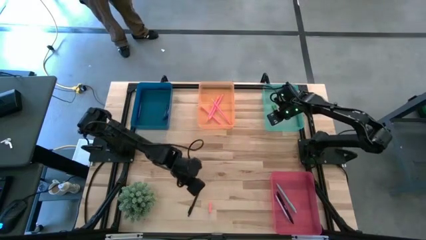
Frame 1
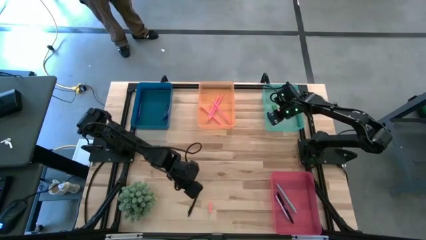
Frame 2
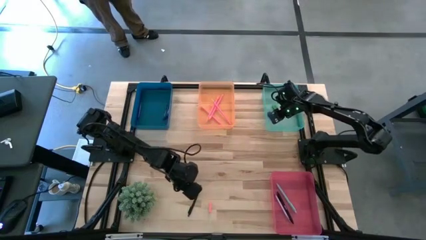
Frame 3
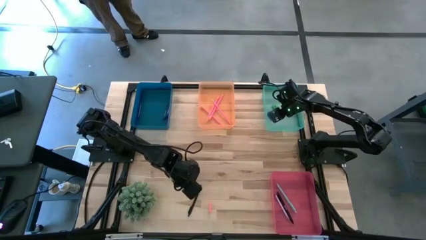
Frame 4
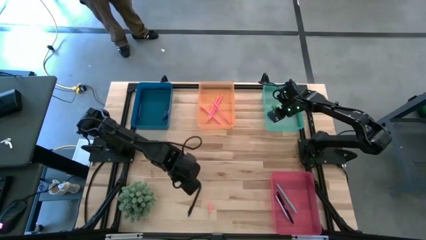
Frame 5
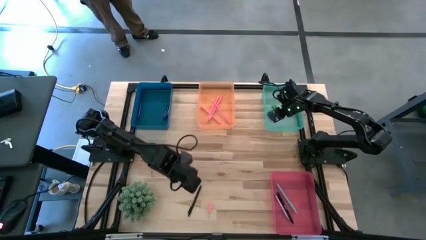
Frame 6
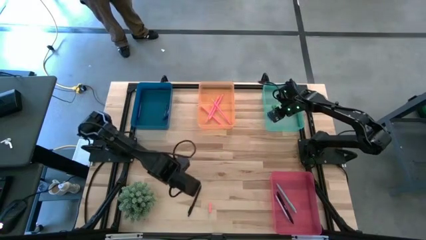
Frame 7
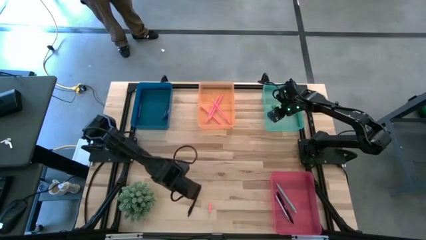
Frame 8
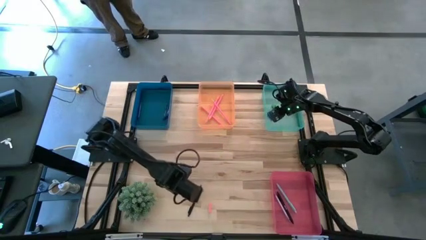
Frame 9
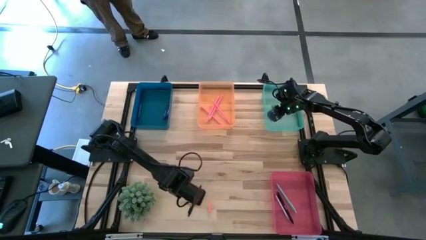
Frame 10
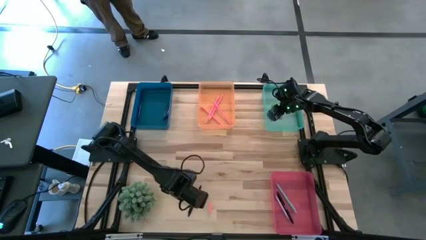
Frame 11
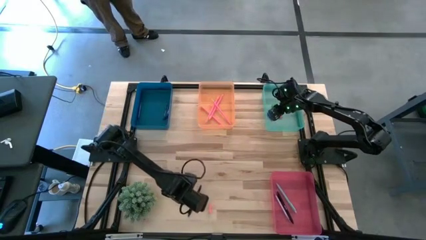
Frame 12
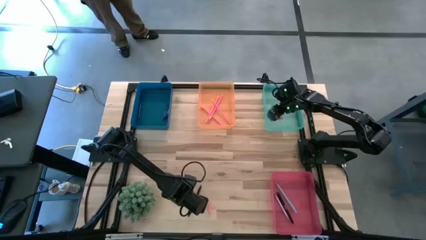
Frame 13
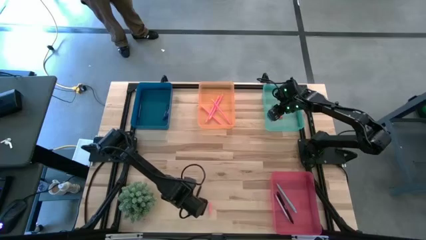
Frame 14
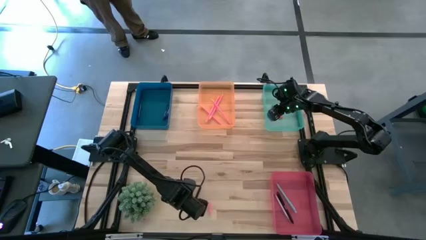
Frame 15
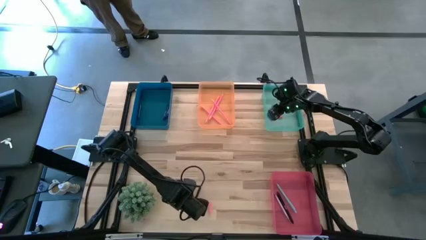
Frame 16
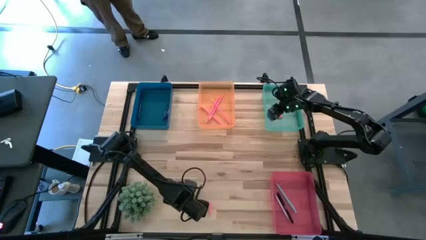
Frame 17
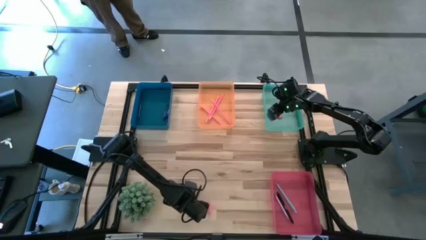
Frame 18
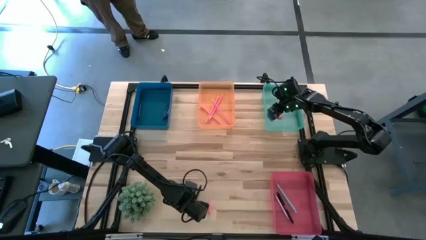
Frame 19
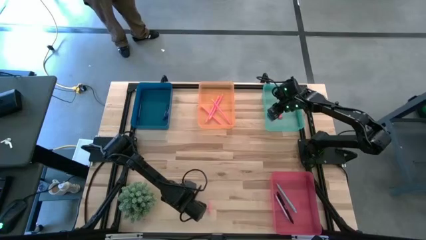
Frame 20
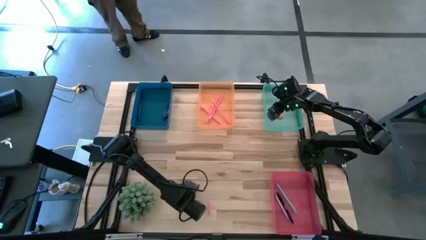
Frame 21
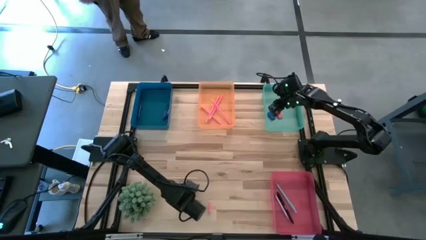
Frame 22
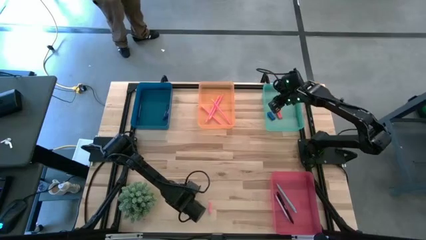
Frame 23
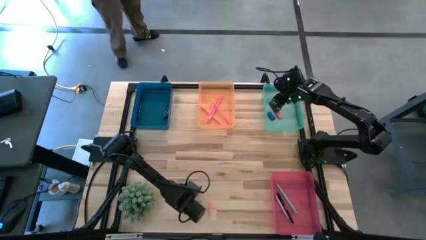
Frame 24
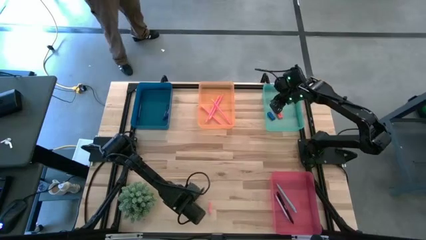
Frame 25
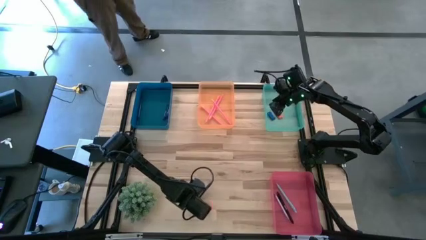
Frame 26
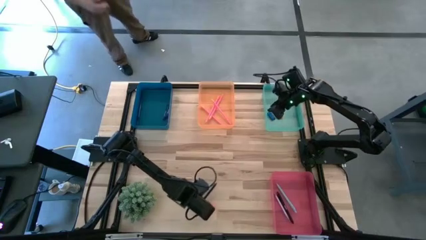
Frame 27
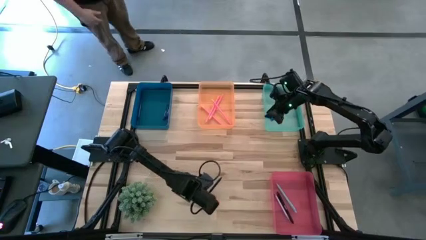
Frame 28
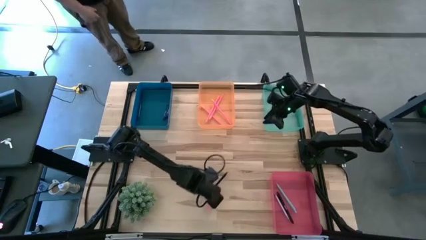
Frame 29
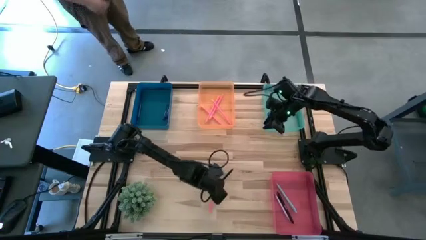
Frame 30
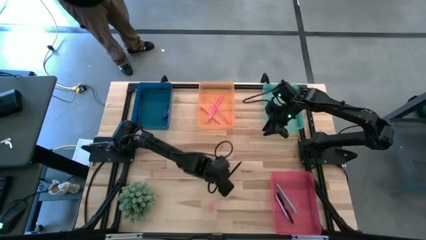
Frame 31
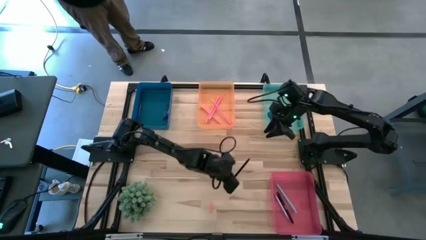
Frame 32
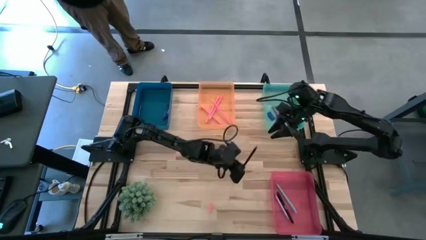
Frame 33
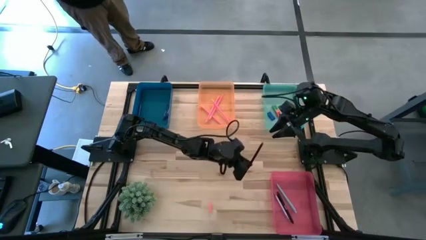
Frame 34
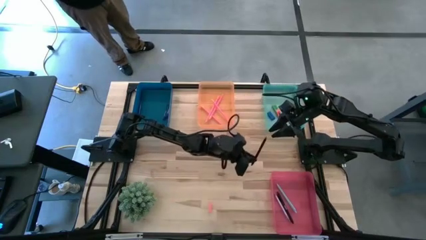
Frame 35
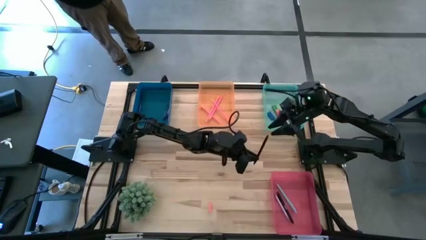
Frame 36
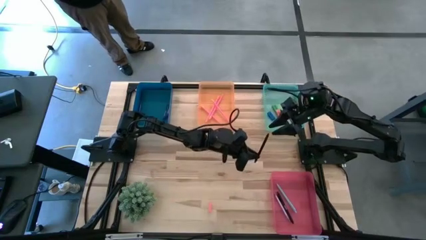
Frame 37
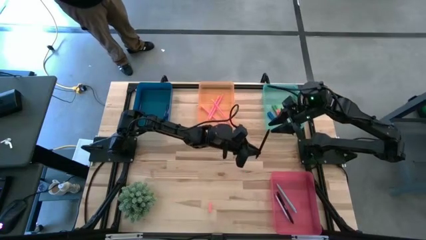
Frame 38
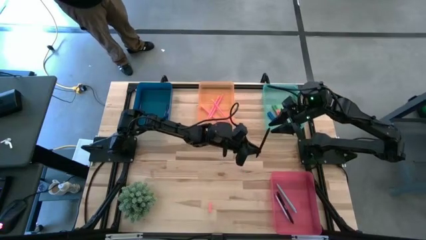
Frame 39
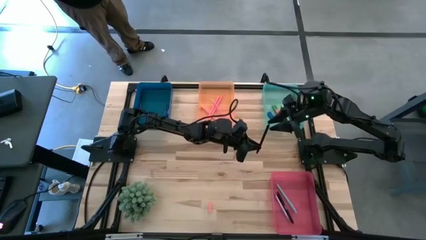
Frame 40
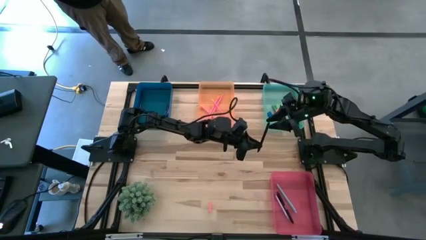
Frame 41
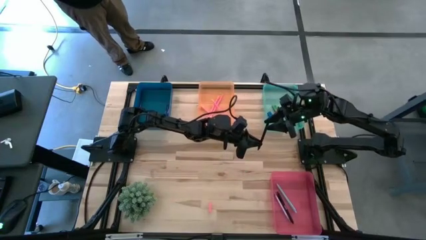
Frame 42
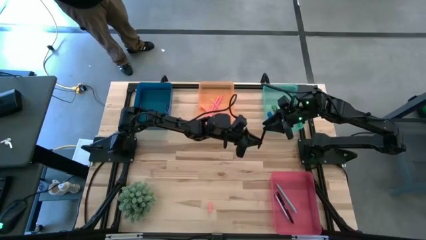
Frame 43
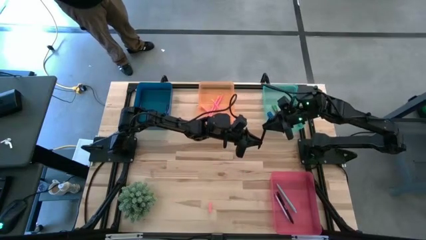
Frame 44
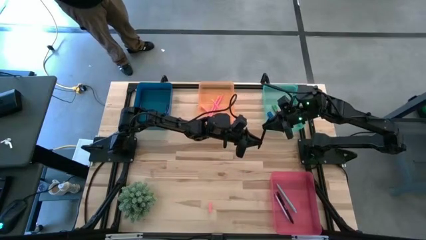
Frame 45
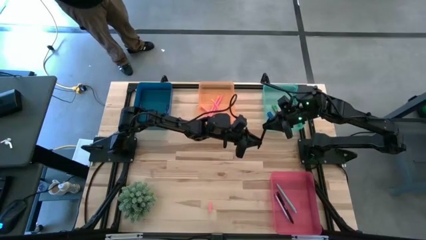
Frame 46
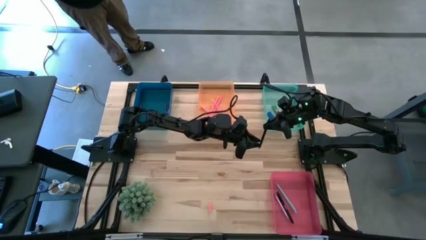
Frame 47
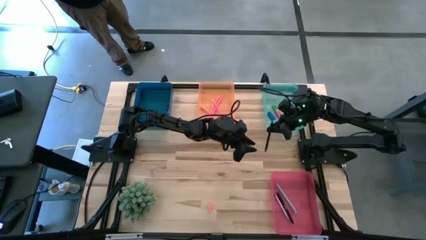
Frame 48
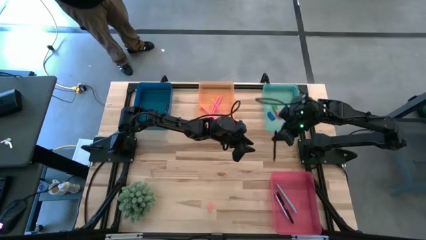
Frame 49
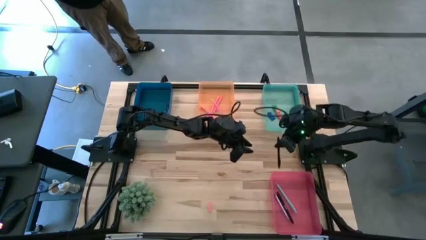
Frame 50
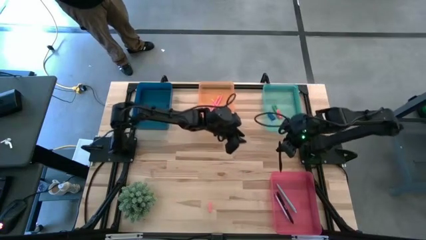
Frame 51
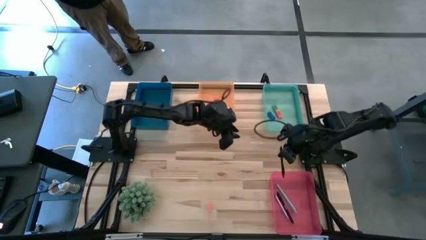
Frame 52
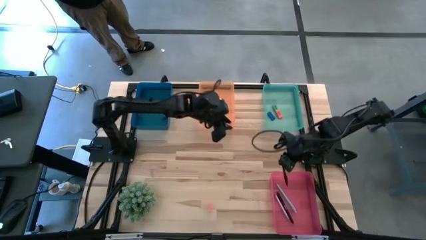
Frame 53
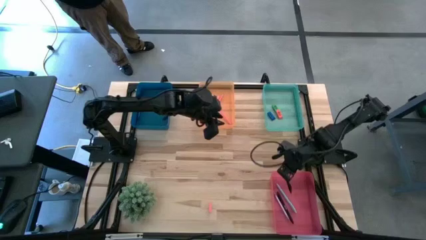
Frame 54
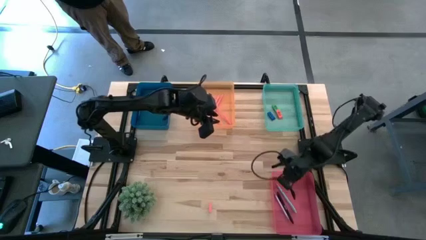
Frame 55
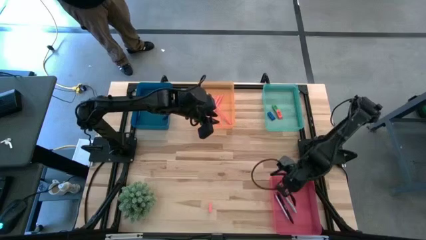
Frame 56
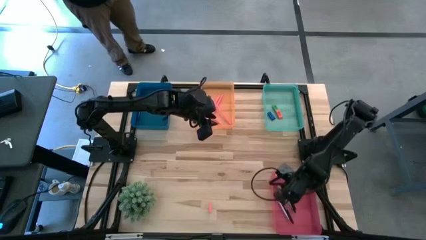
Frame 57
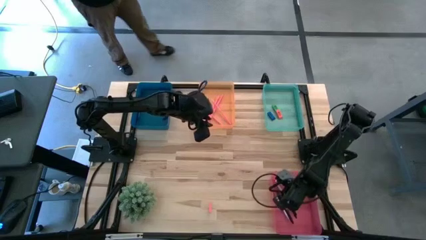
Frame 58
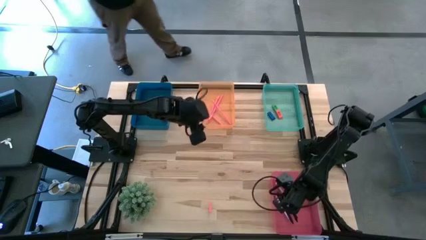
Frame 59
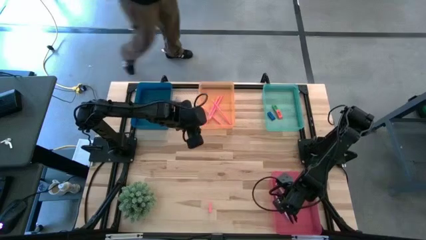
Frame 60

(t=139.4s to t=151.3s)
Task: Sort crayons/erasers/pens/pencils in bins
Put the black pen into the pink bin

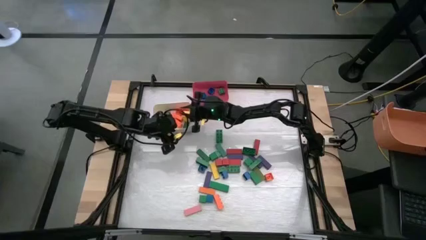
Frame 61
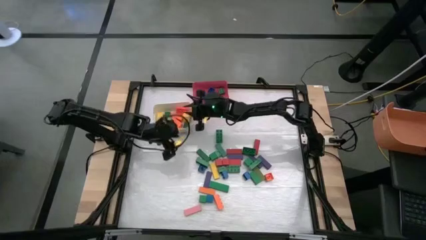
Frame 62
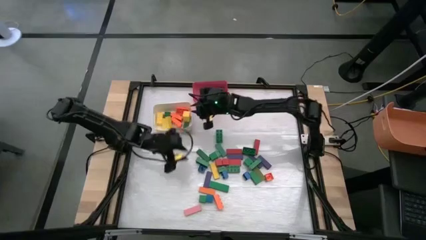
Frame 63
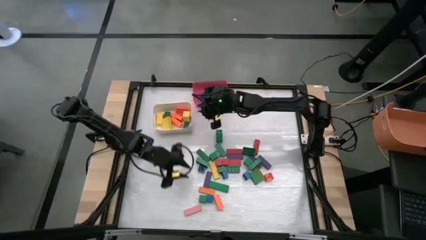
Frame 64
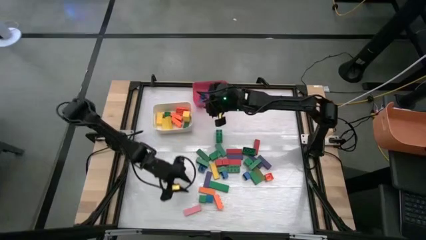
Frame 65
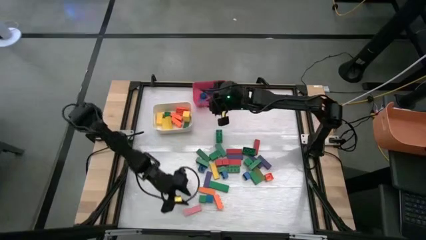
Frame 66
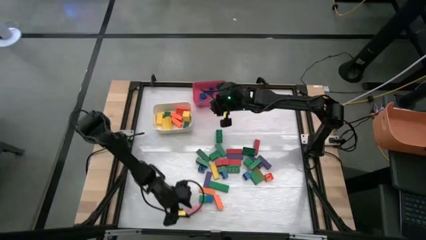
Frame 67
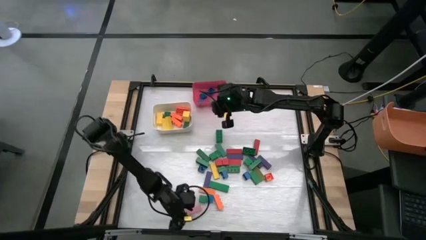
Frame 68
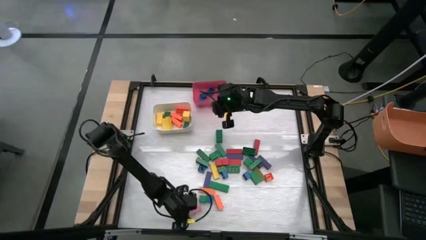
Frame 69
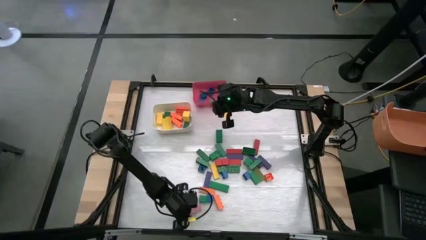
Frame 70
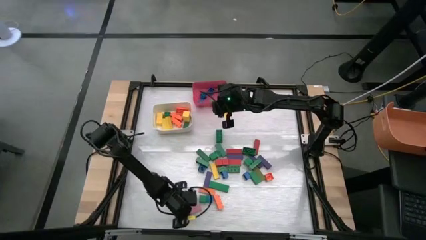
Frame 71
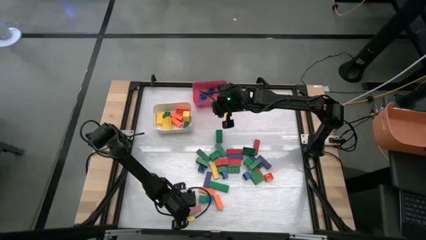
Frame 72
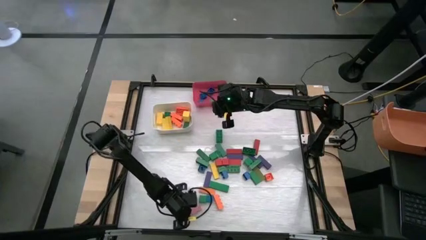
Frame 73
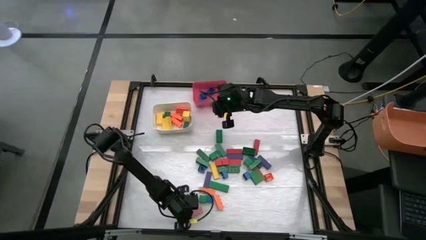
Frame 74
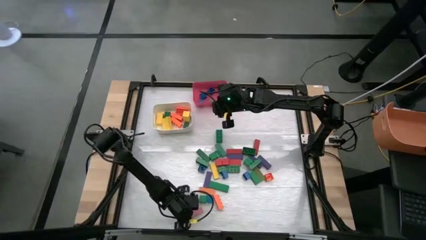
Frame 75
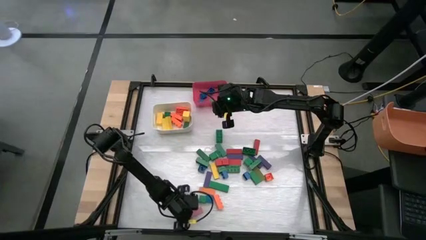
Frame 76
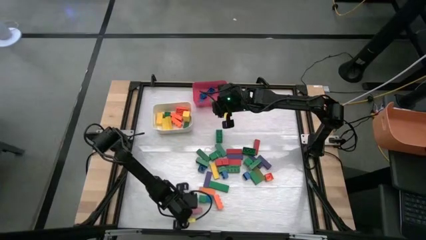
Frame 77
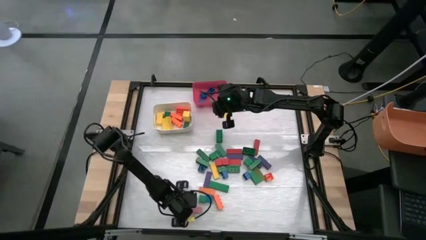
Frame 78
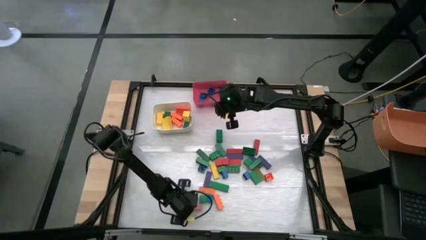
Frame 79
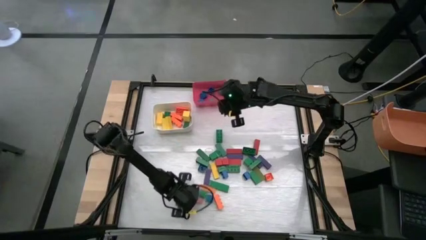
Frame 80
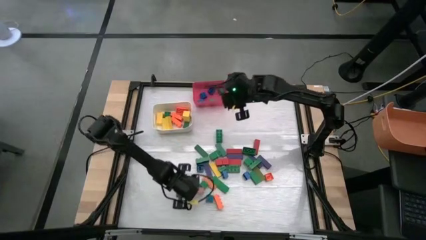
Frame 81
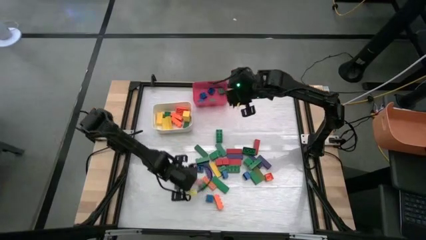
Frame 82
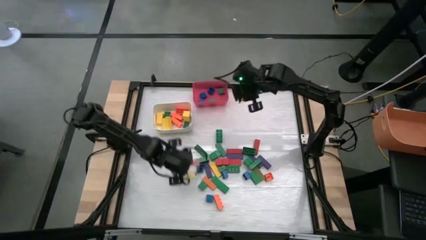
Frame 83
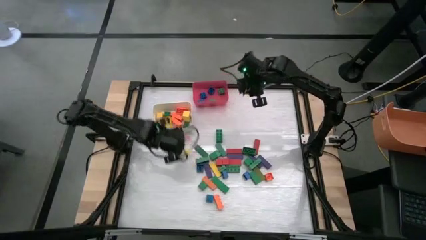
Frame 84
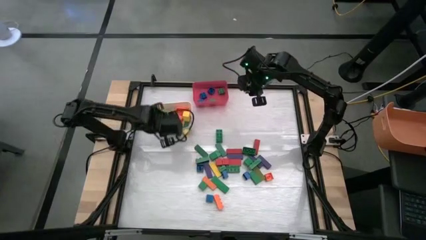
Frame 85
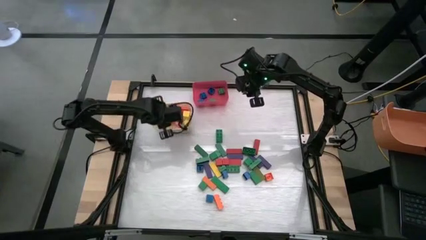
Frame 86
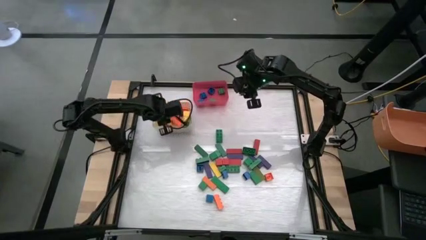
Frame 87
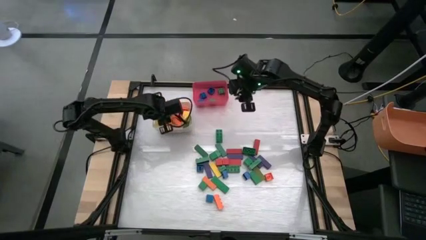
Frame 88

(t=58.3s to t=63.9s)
Task: Sort blocks by size
Put the large pink wooden block into the white bin
